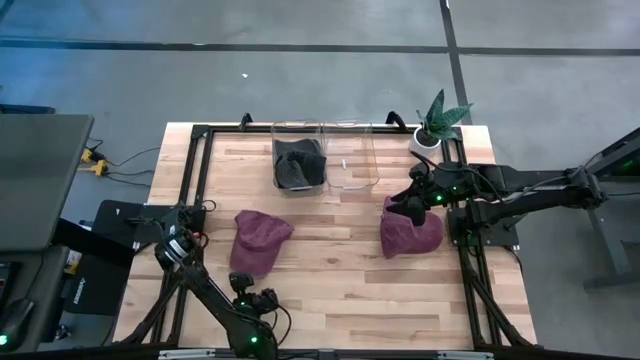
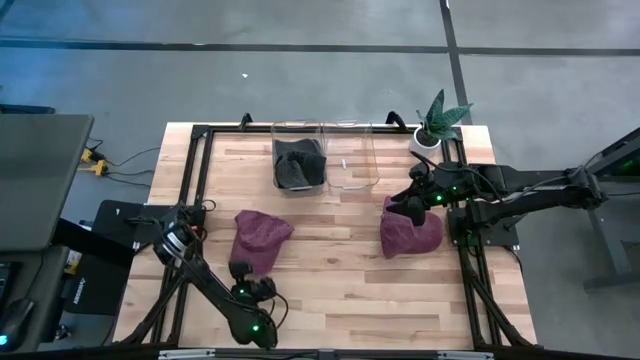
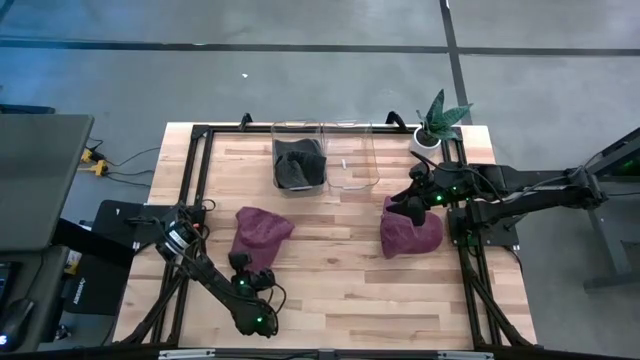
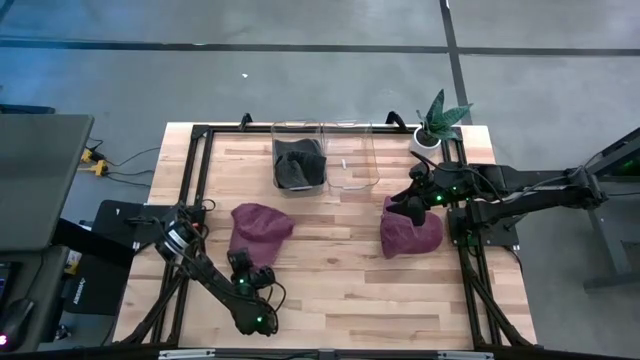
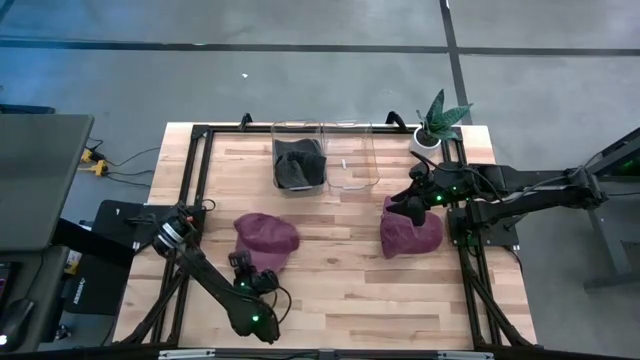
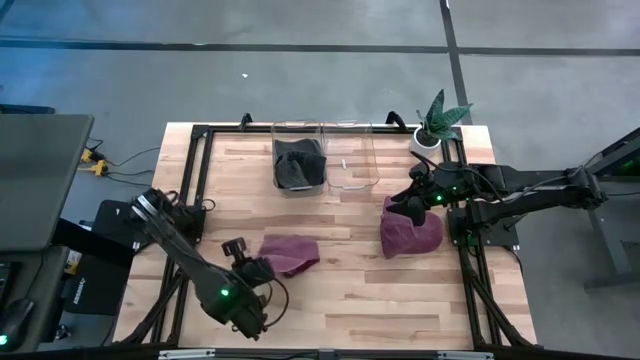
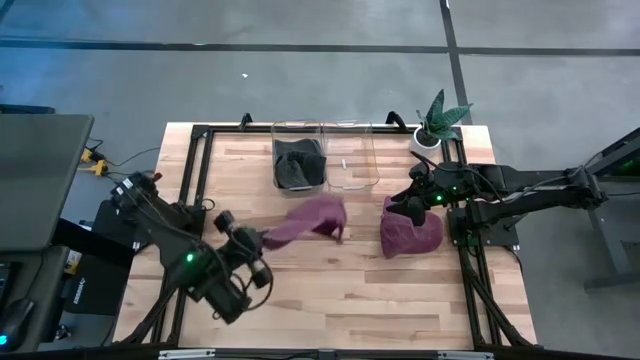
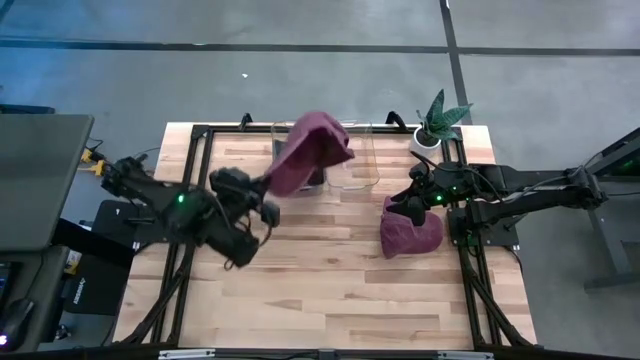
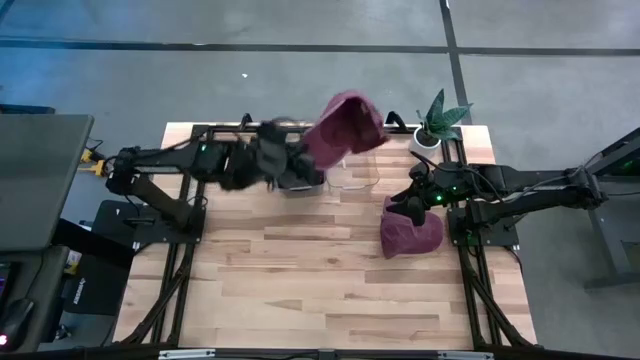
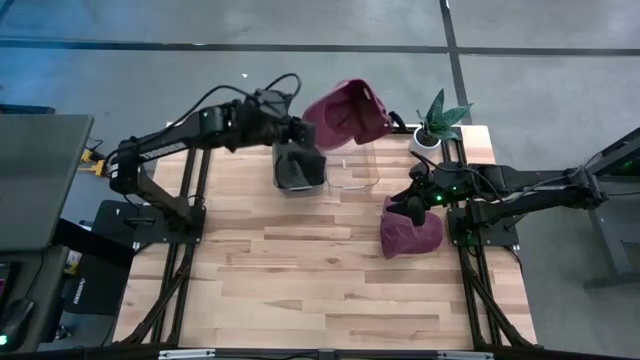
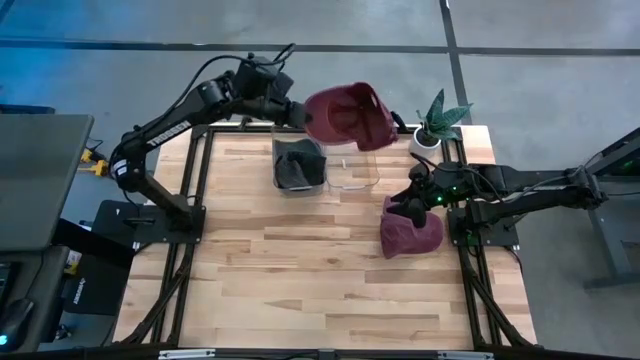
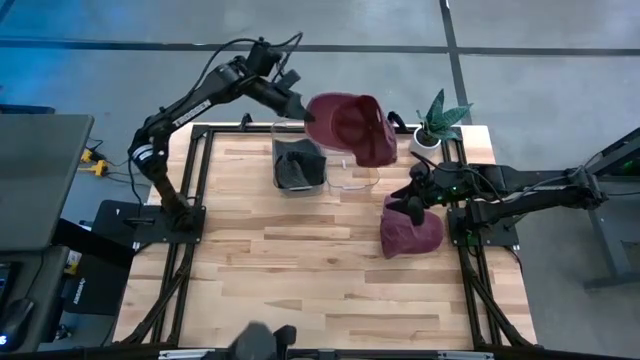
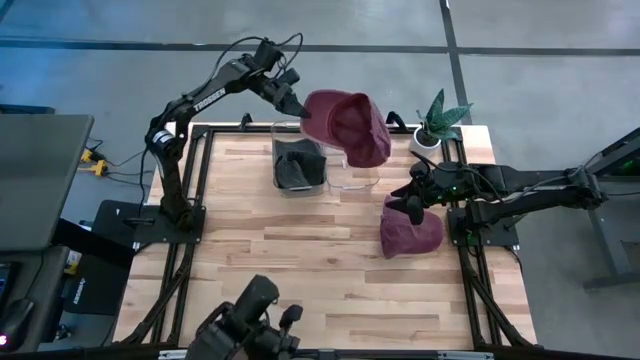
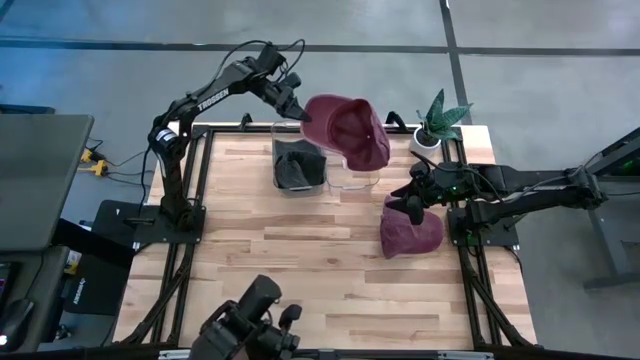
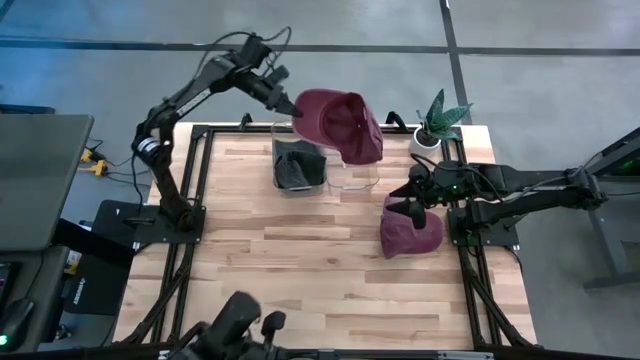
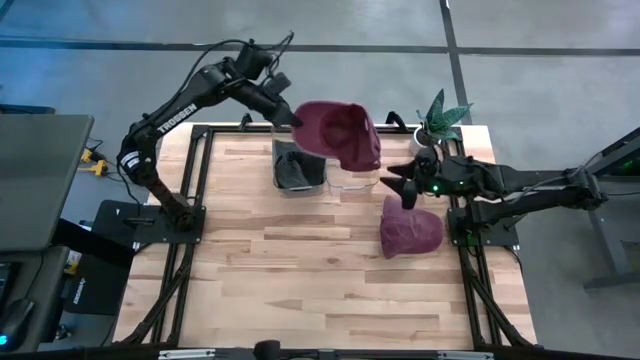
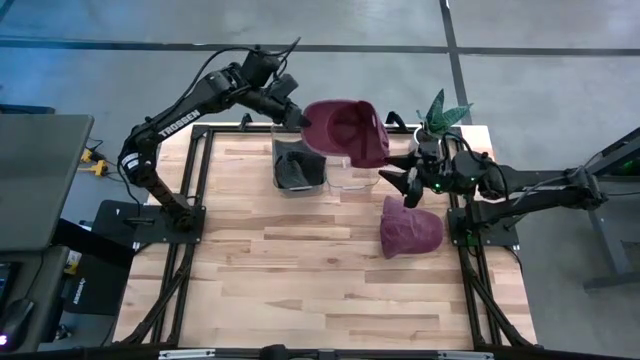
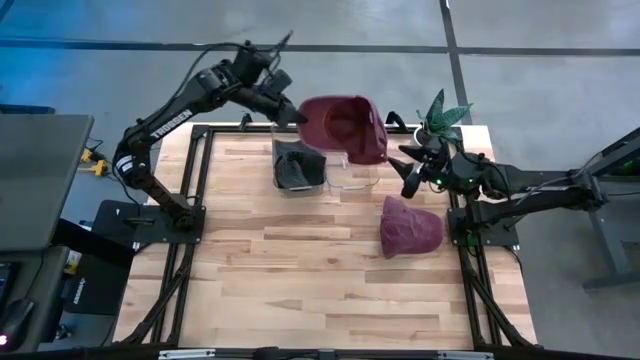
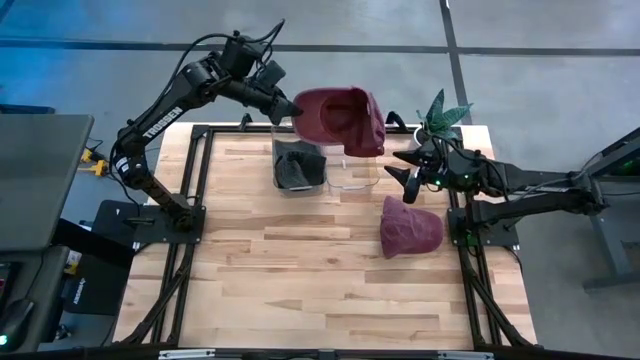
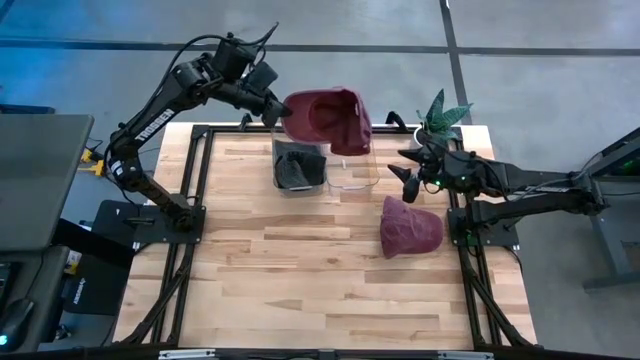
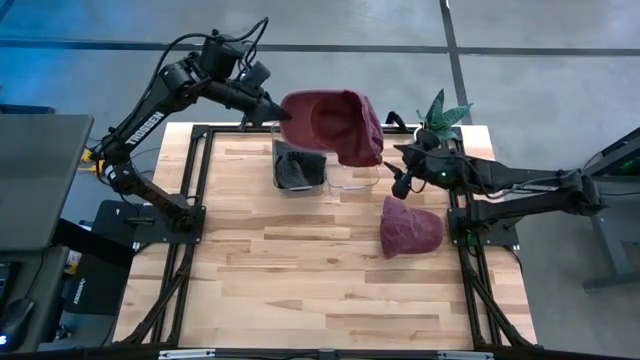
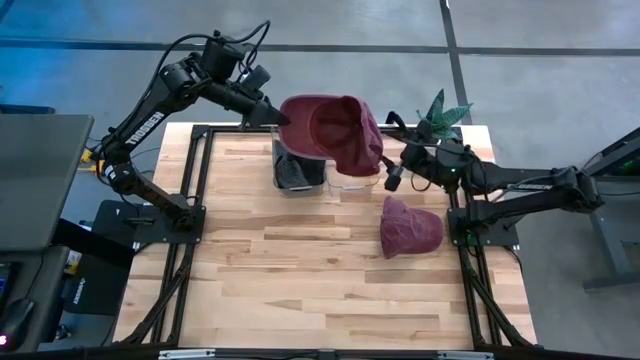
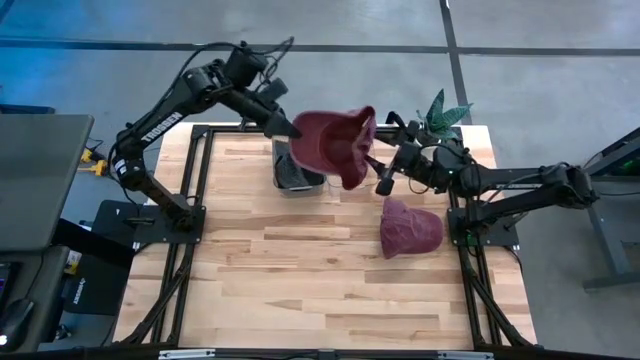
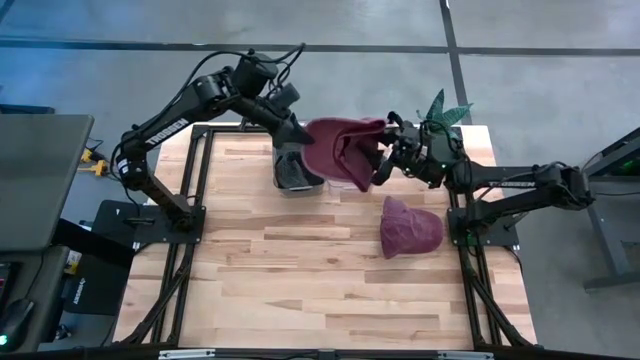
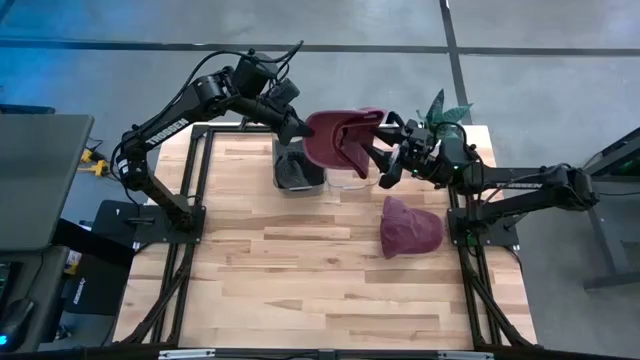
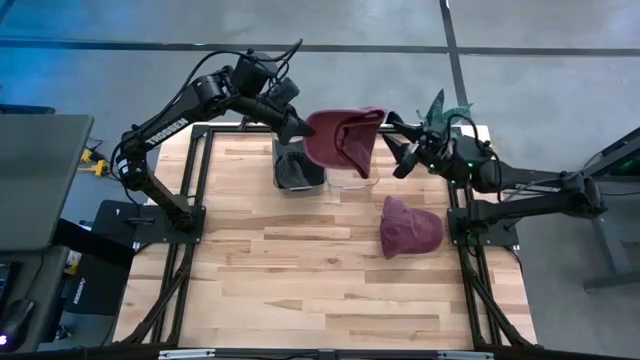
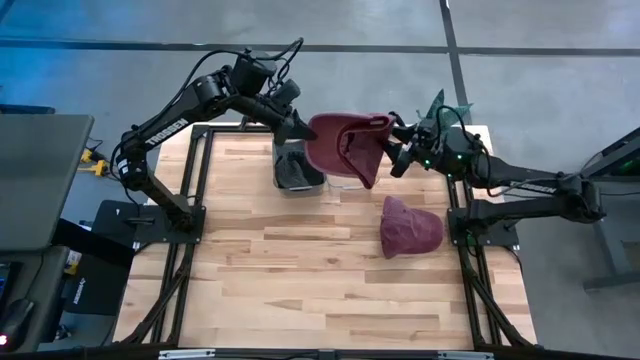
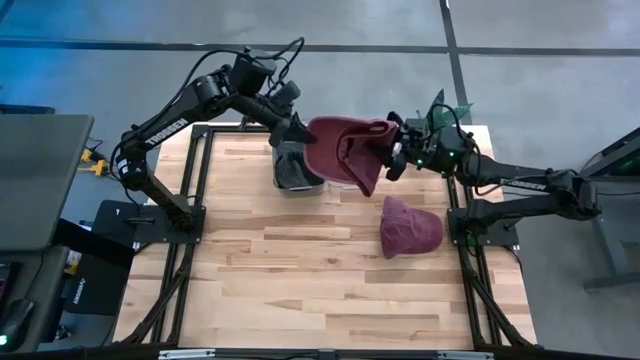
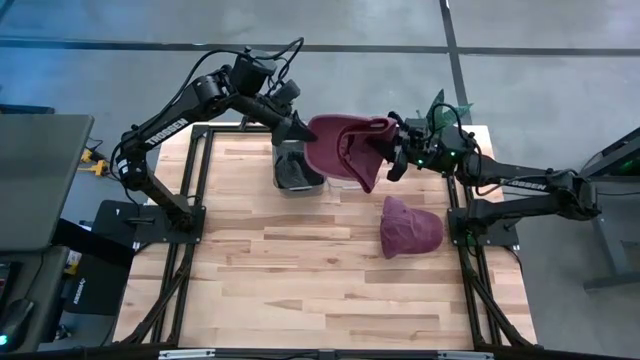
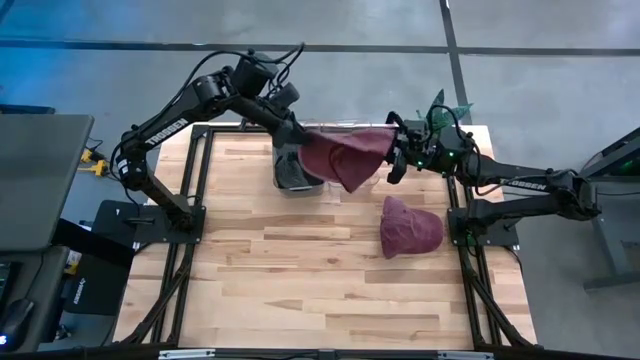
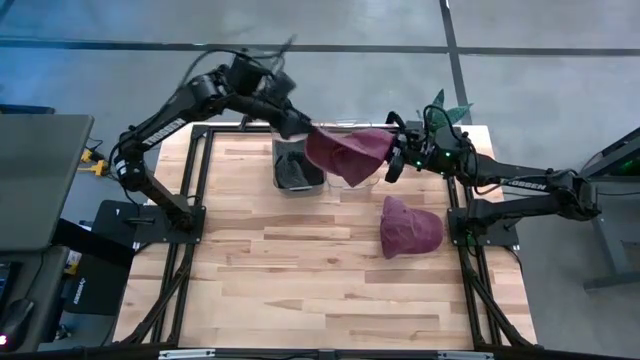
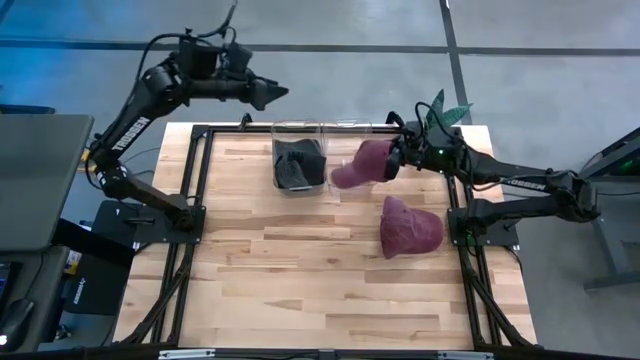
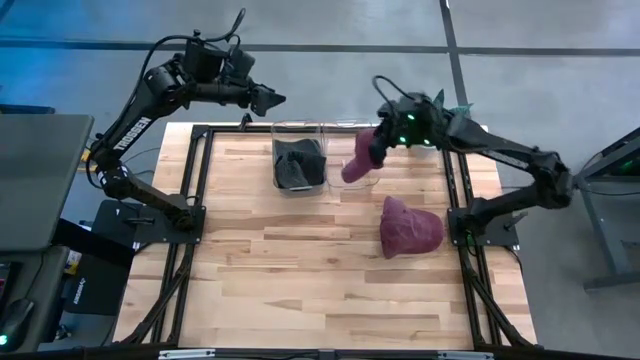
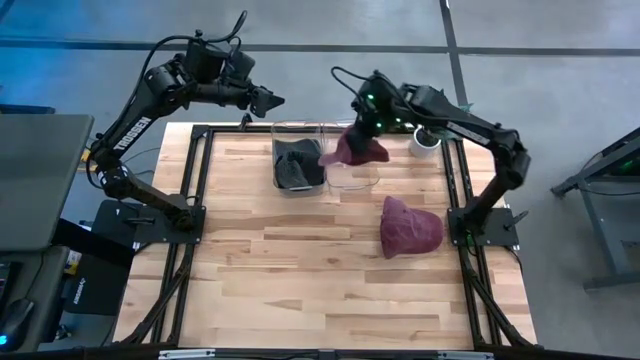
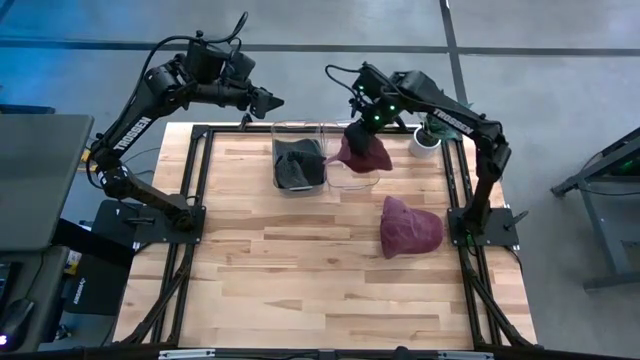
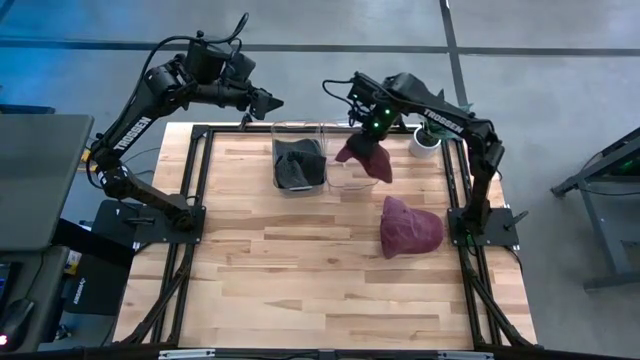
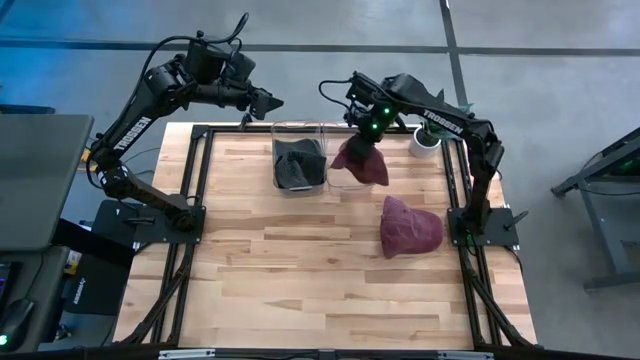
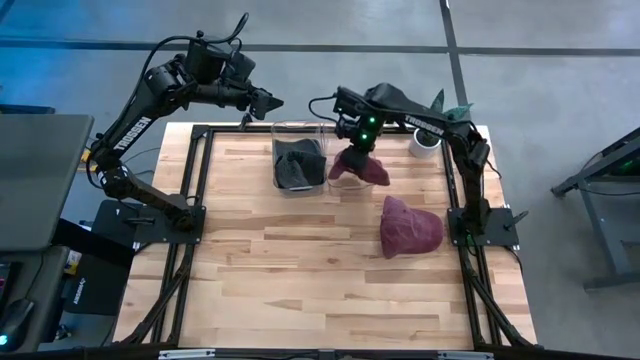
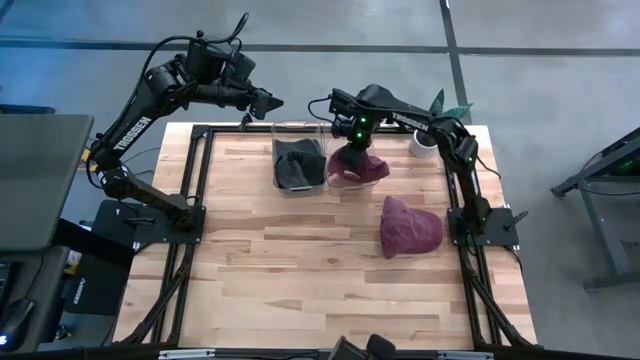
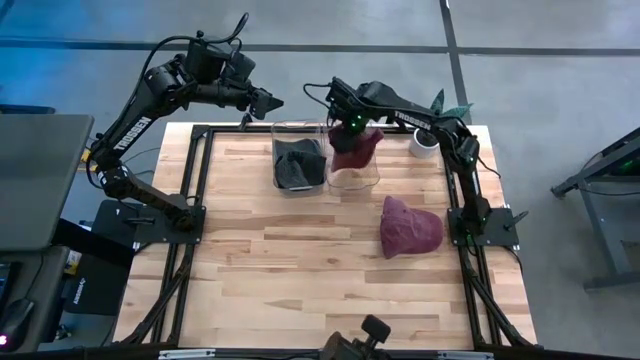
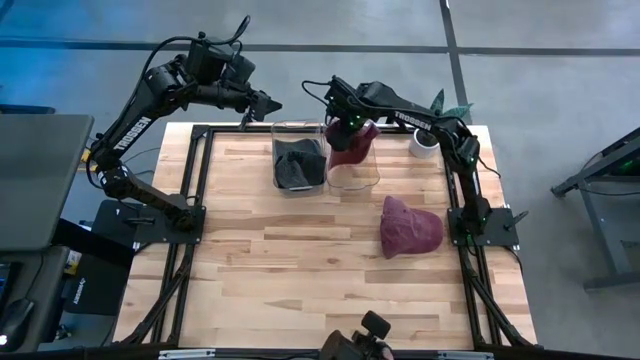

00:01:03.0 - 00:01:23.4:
Task: Pick & Place hat
Put the left red cap into the right transparent bin
